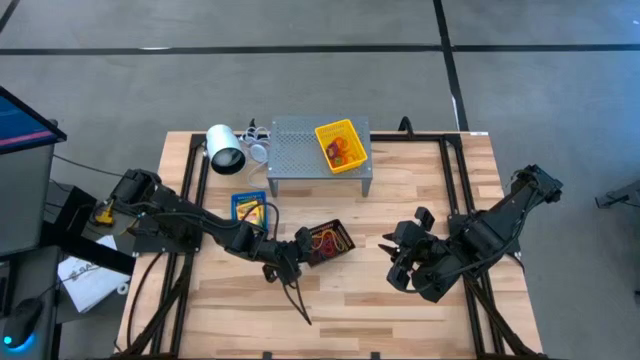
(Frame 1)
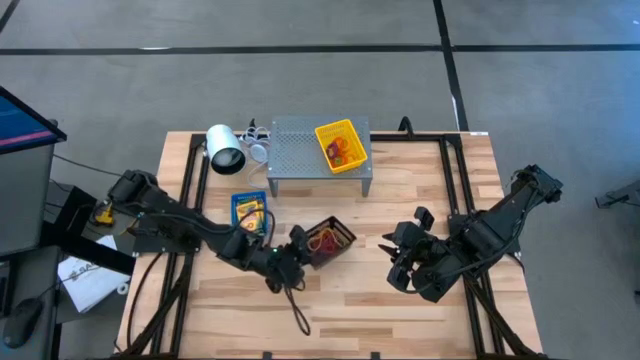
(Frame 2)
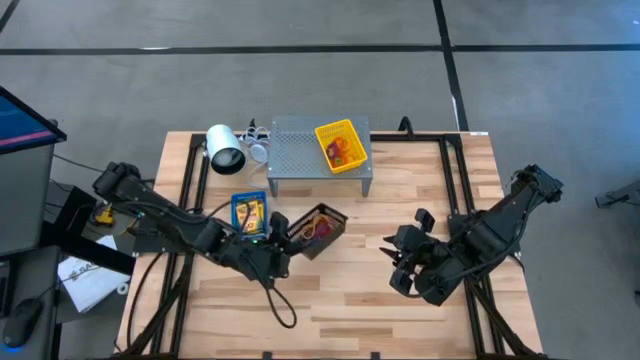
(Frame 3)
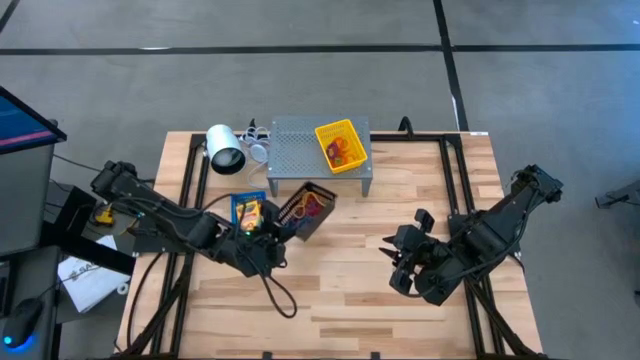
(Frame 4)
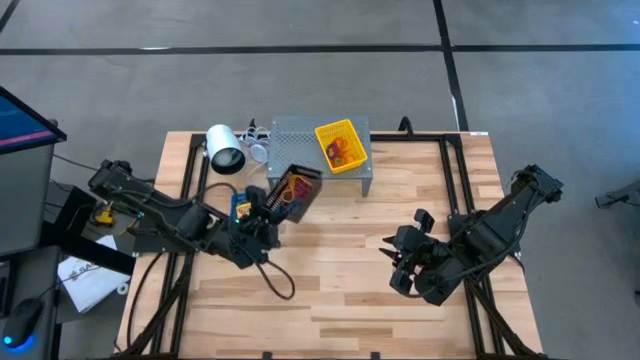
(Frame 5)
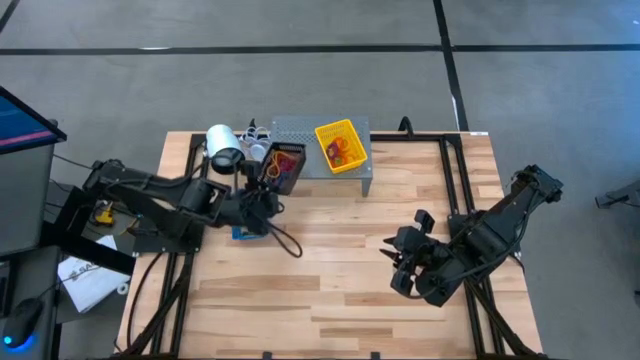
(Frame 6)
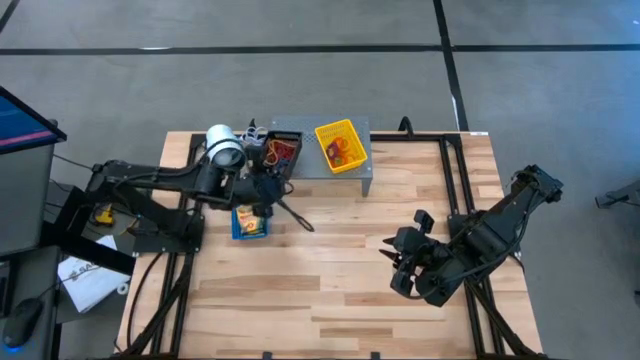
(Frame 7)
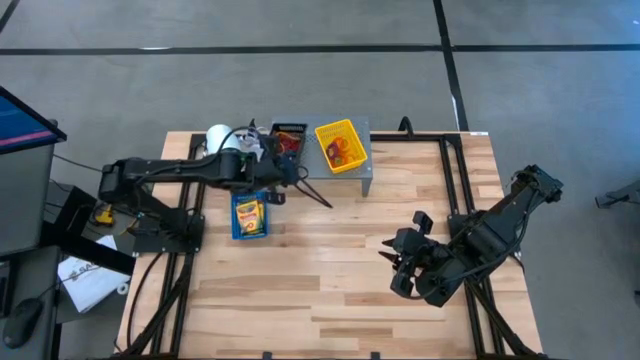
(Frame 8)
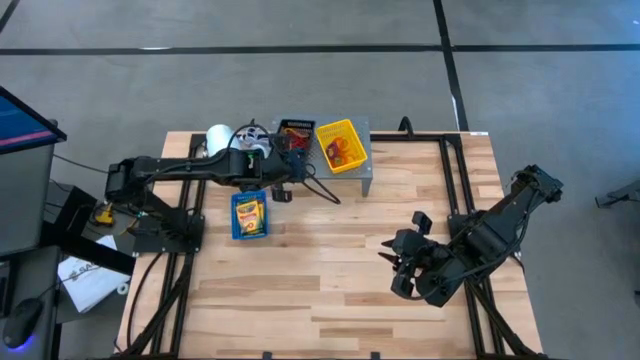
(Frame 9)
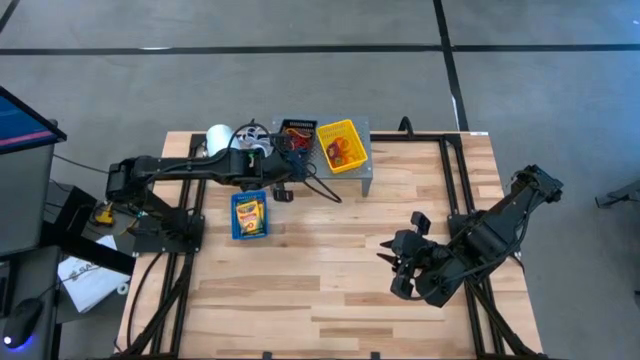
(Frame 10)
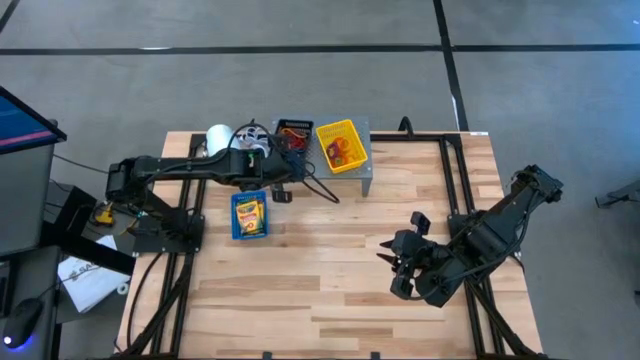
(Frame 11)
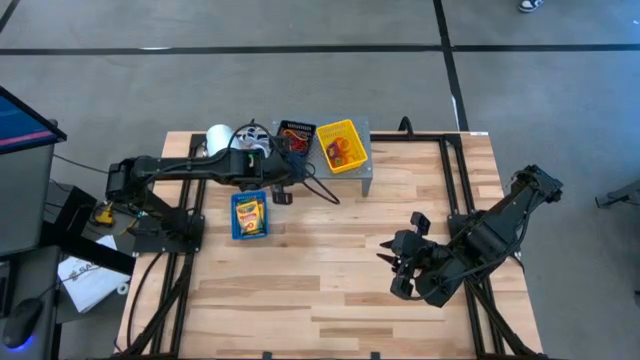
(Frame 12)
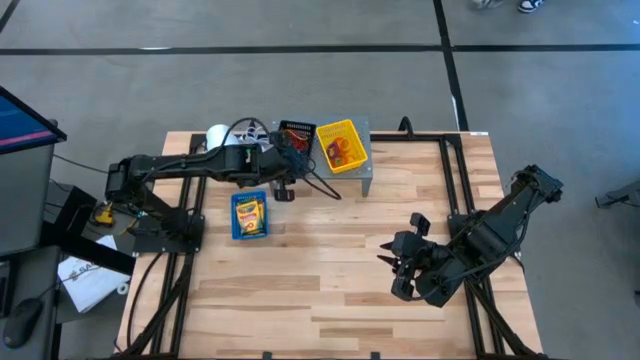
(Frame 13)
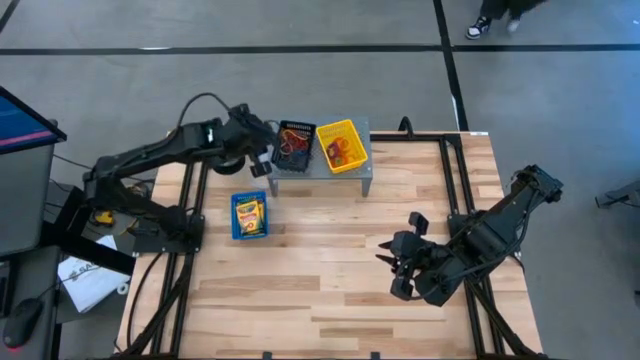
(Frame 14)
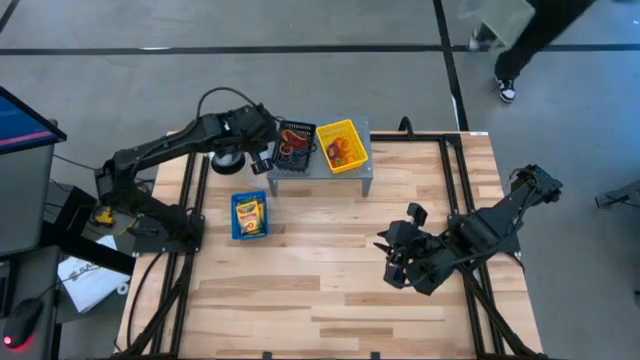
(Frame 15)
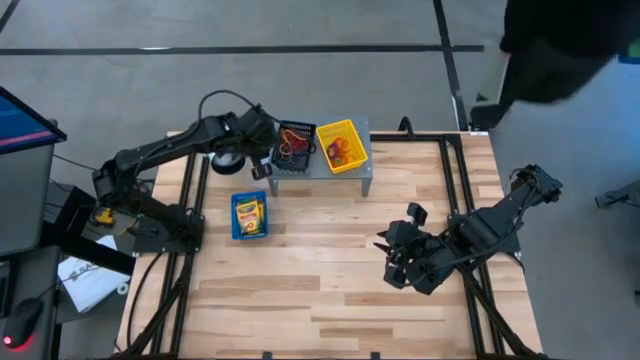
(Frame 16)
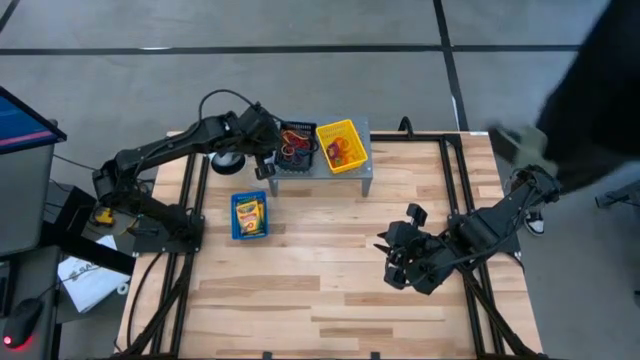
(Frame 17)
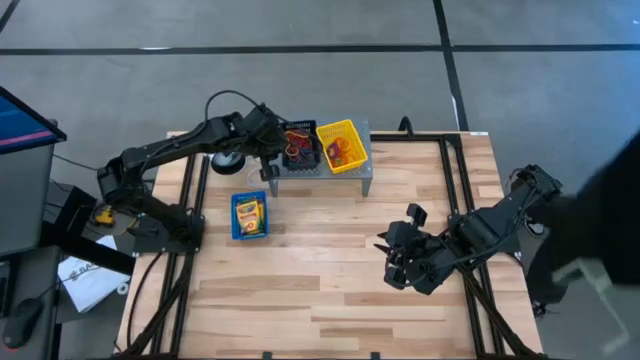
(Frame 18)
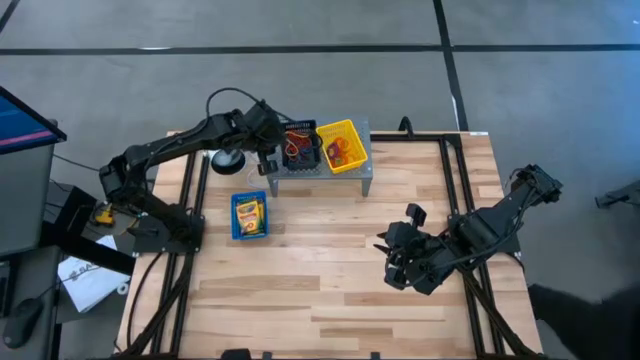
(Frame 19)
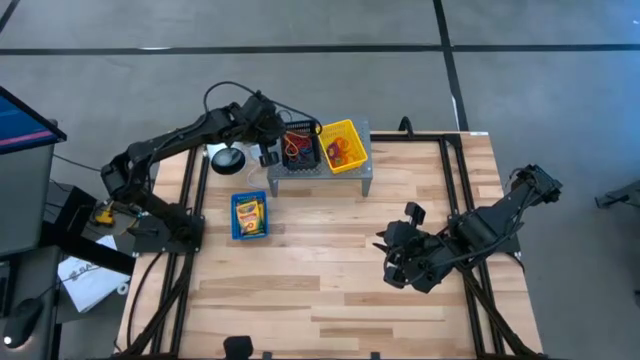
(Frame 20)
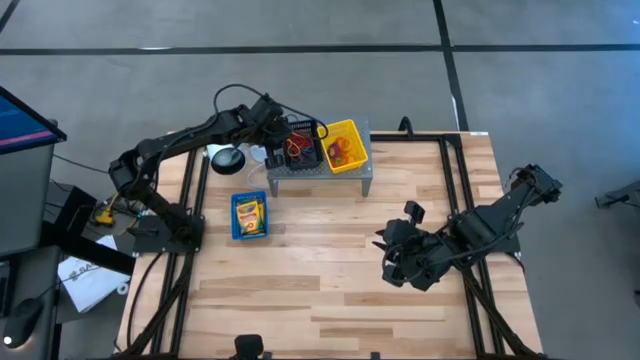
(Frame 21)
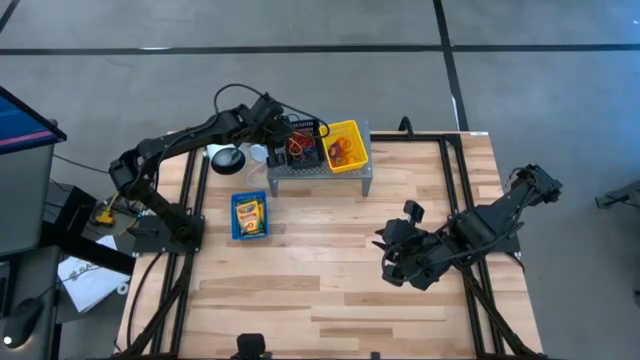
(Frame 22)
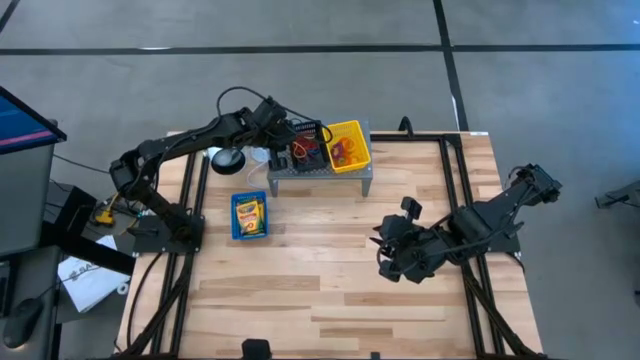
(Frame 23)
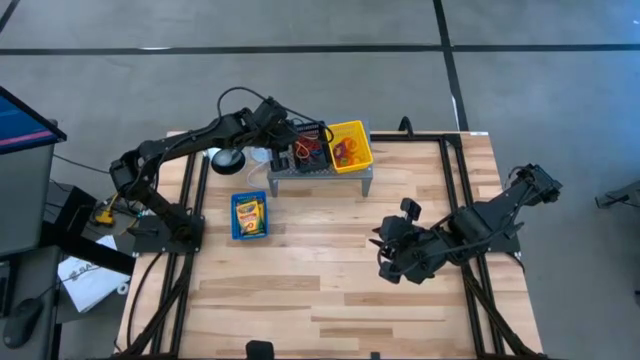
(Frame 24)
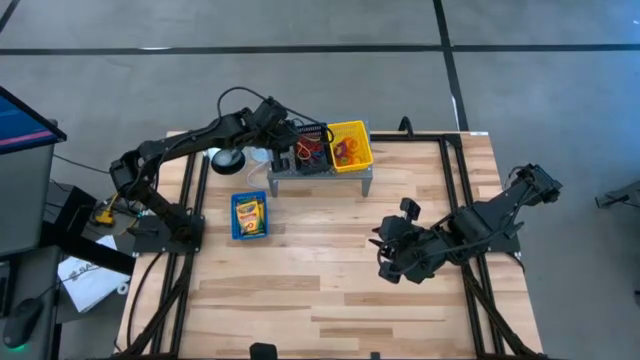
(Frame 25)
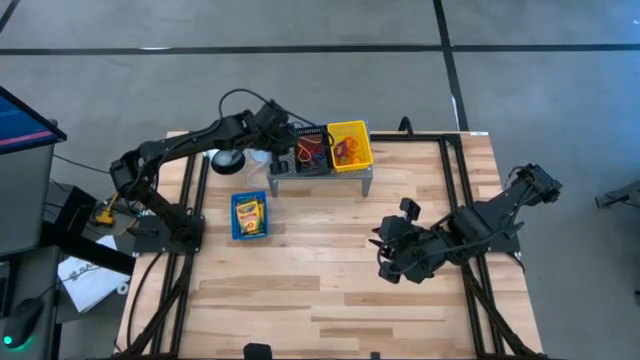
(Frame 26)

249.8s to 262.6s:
Task: Pick & Place Office Desk Supplies
Put the black bin with rubber bands on the shelf

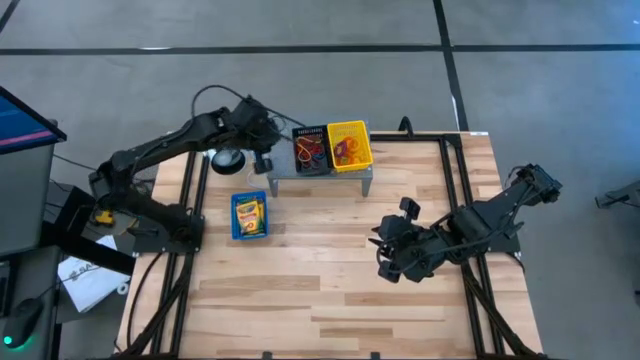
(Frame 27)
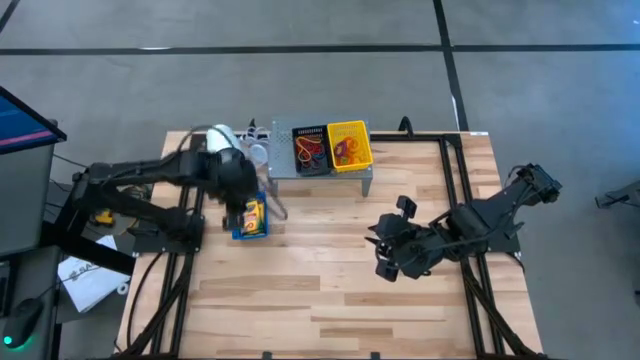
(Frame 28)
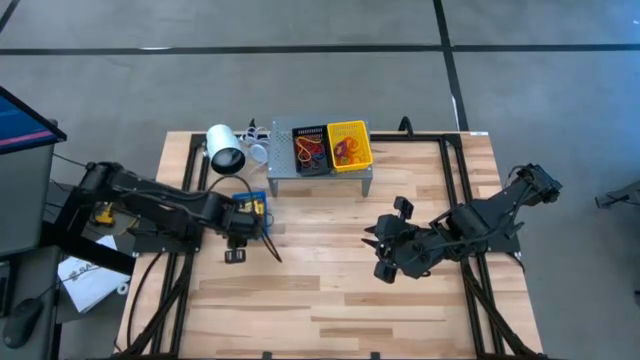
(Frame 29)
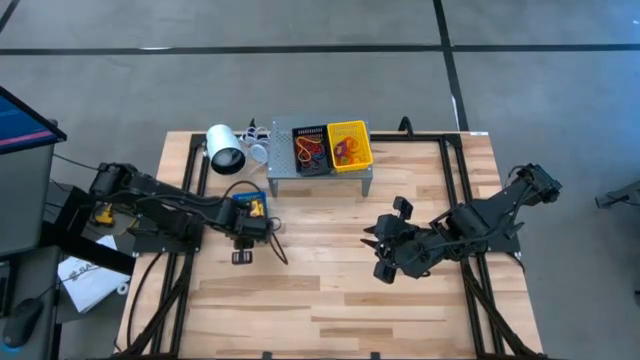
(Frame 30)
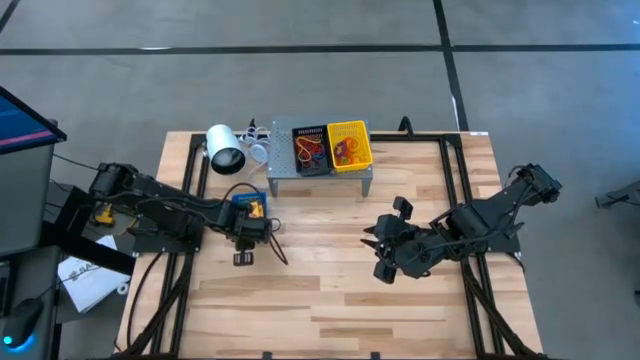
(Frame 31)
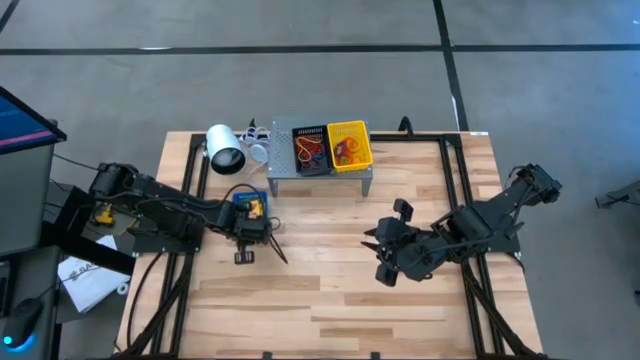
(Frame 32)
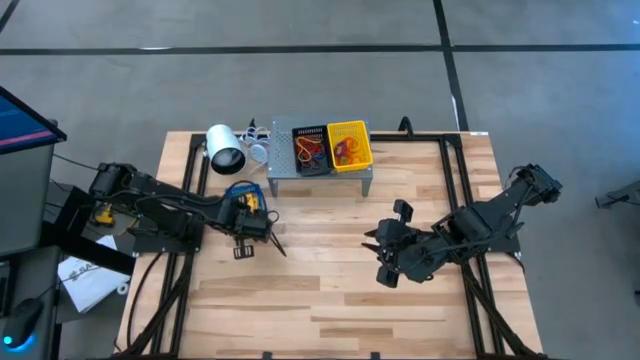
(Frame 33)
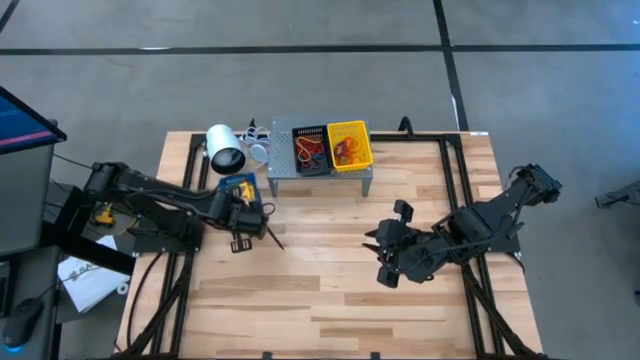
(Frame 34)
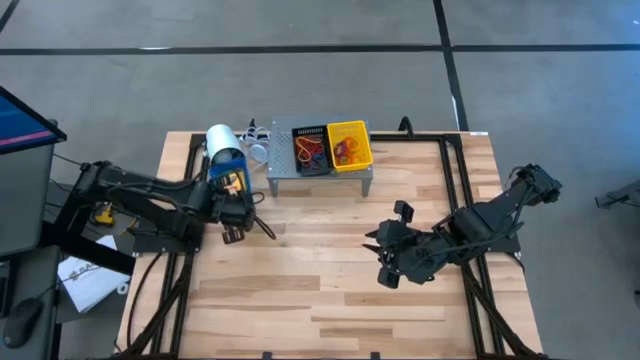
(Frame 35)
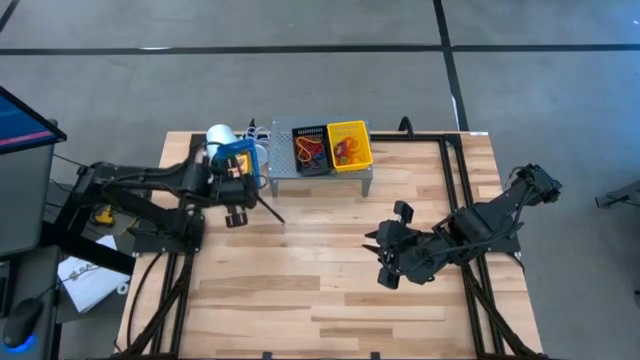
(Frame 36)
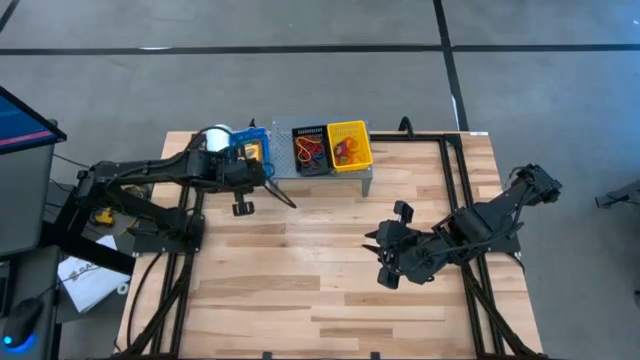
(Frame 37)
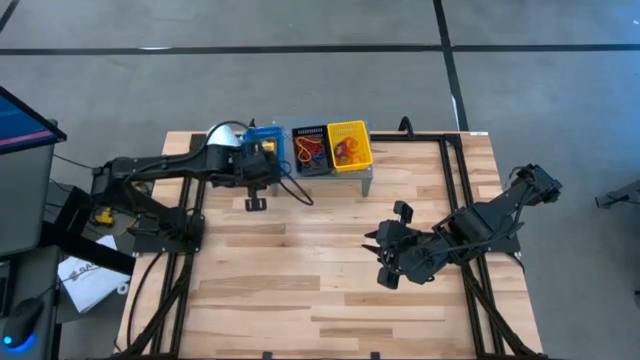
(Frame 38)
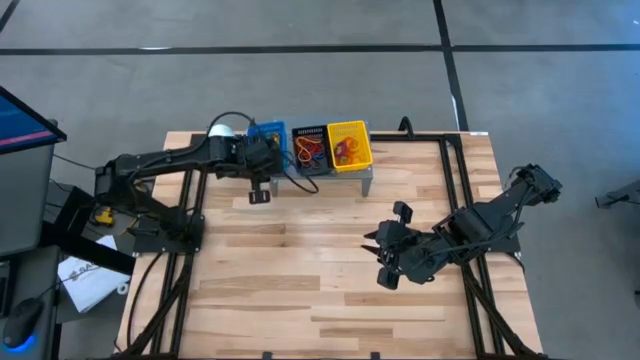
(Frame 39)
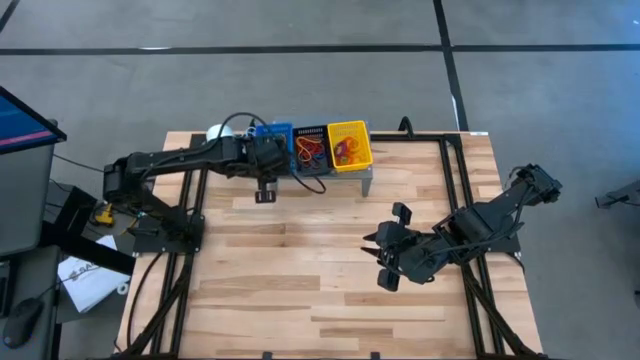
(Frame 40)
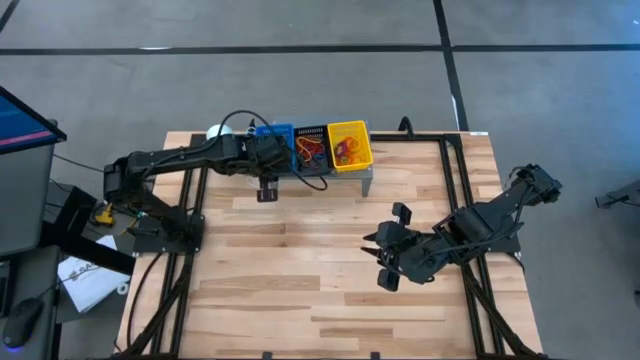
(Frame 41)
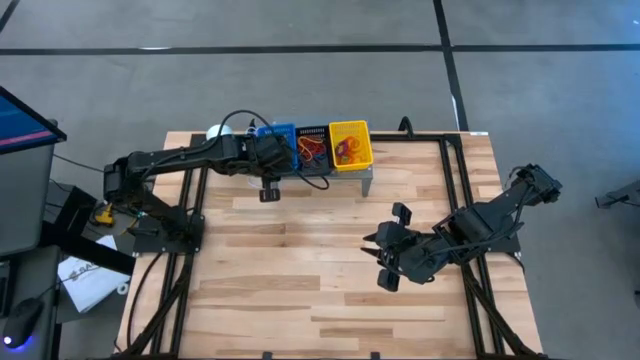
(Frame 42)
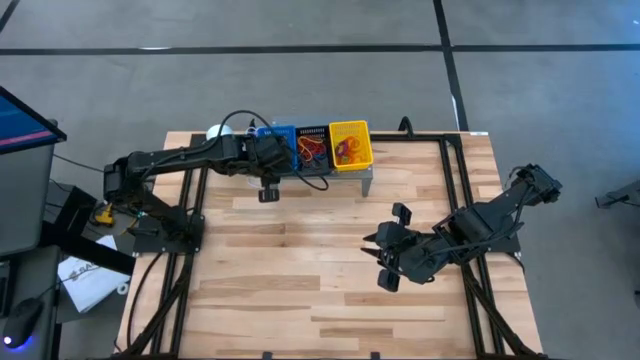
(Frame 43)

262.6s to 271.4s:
Put the blue bin with crayon boxes on the shelf
